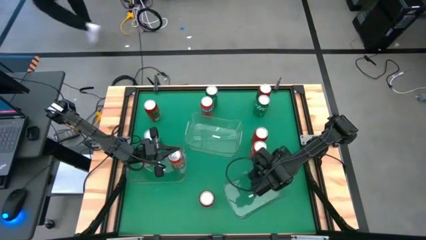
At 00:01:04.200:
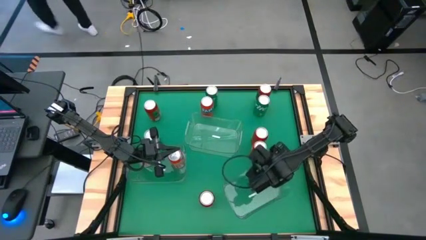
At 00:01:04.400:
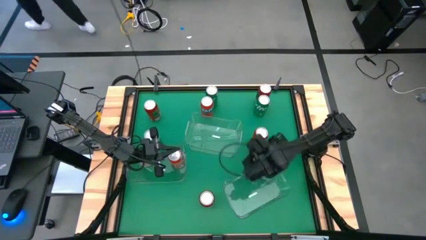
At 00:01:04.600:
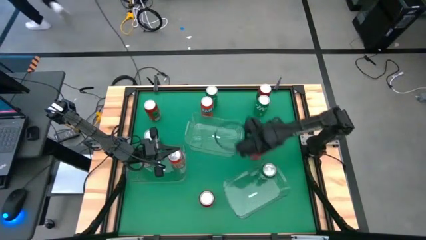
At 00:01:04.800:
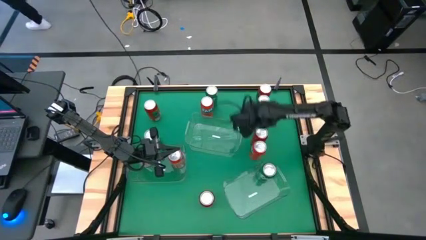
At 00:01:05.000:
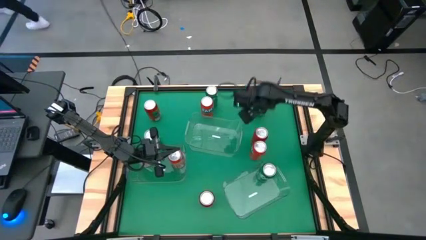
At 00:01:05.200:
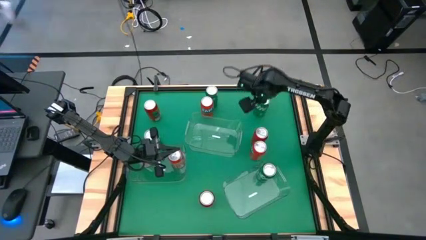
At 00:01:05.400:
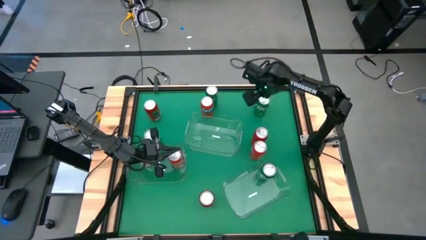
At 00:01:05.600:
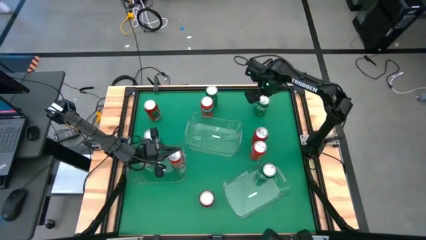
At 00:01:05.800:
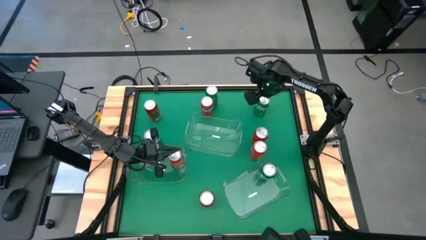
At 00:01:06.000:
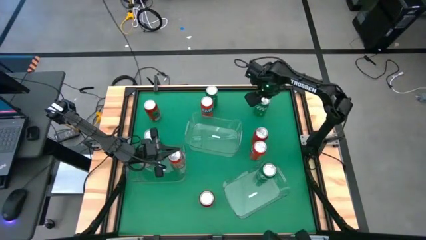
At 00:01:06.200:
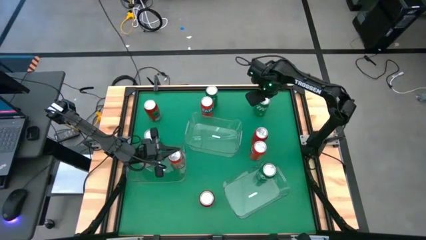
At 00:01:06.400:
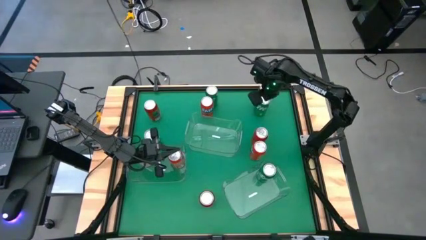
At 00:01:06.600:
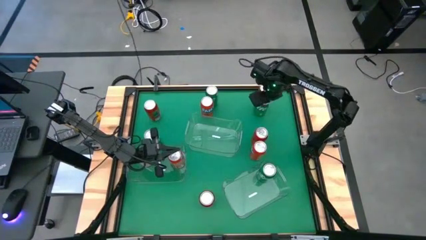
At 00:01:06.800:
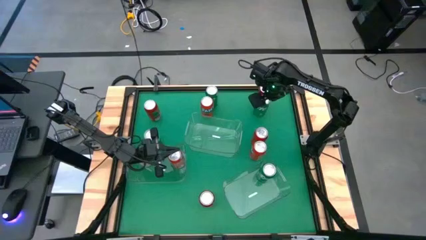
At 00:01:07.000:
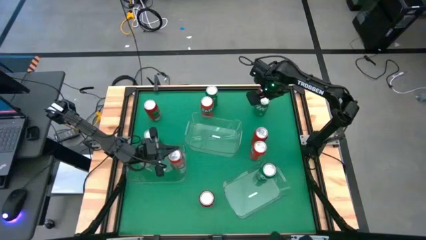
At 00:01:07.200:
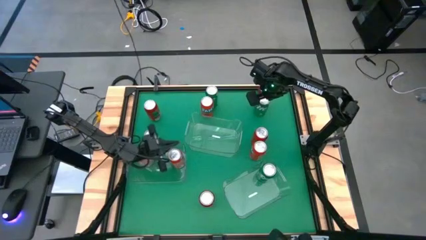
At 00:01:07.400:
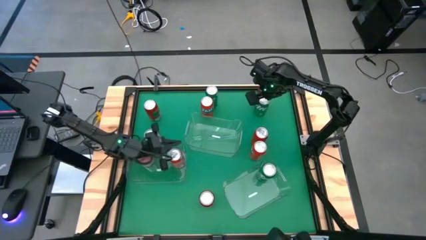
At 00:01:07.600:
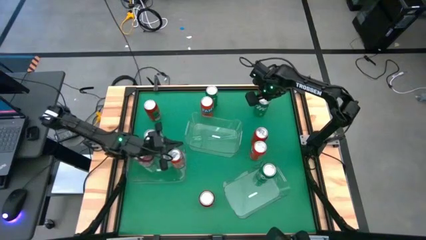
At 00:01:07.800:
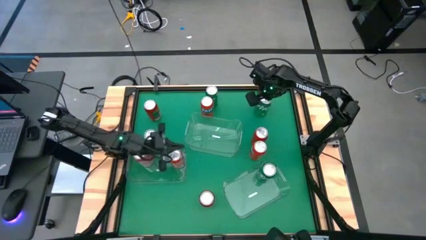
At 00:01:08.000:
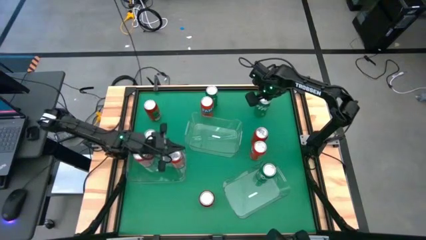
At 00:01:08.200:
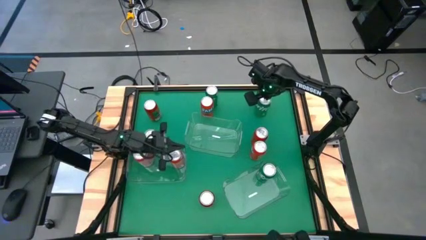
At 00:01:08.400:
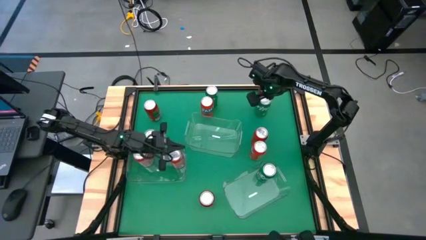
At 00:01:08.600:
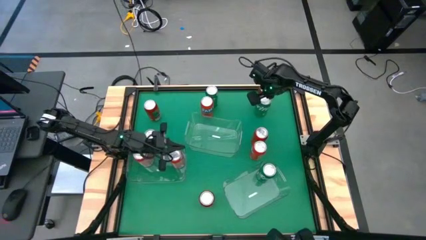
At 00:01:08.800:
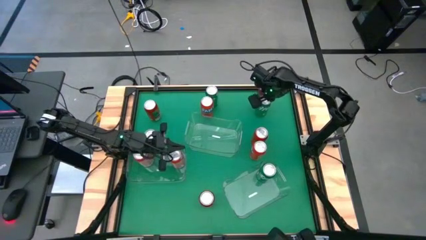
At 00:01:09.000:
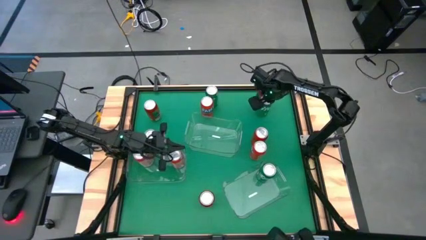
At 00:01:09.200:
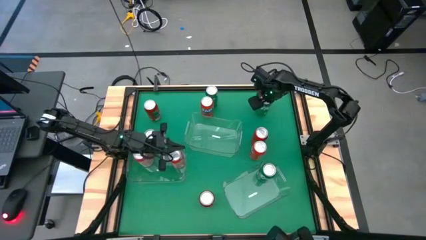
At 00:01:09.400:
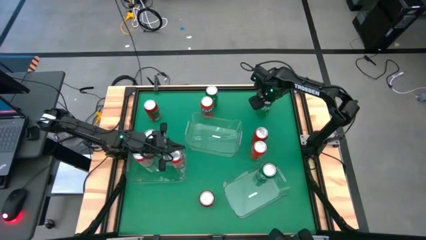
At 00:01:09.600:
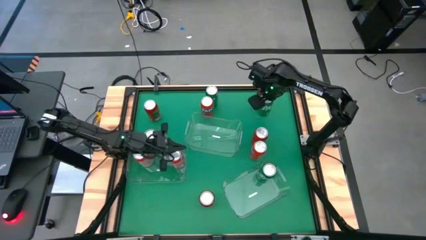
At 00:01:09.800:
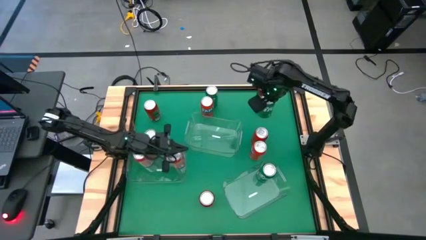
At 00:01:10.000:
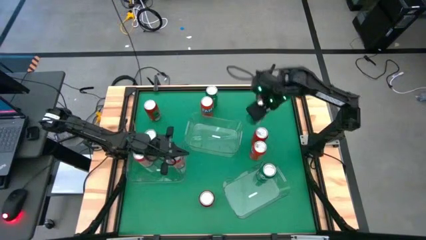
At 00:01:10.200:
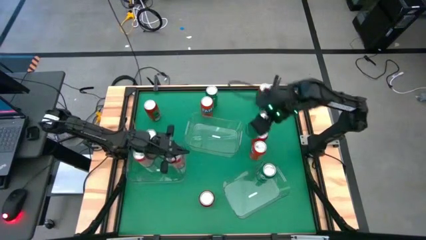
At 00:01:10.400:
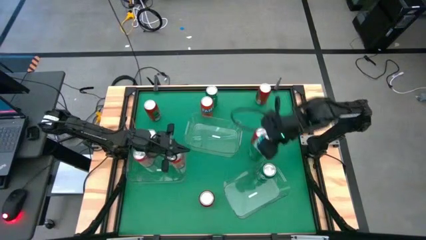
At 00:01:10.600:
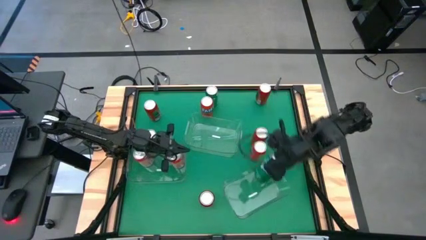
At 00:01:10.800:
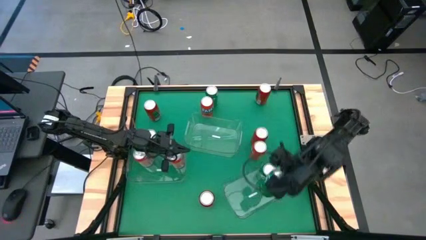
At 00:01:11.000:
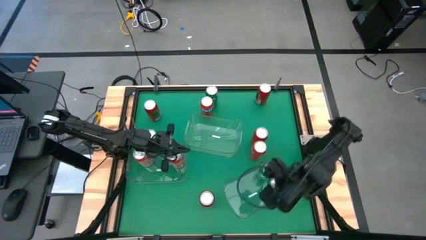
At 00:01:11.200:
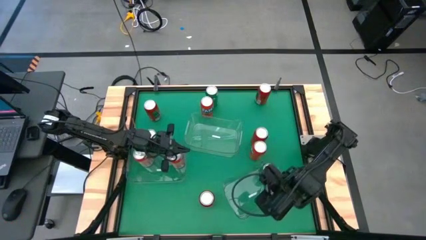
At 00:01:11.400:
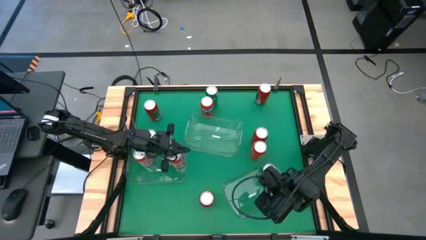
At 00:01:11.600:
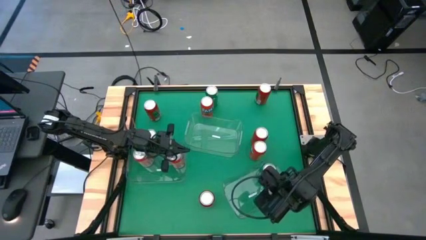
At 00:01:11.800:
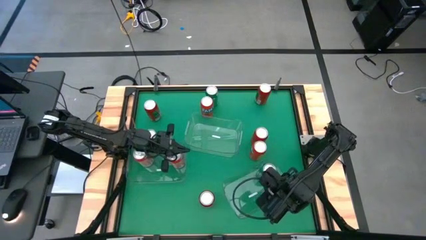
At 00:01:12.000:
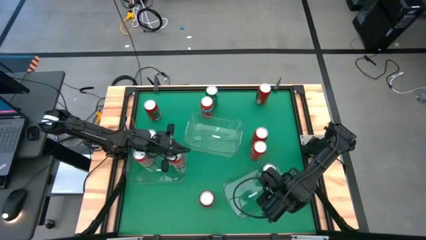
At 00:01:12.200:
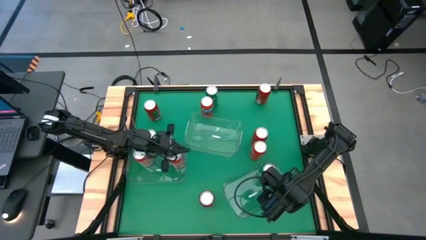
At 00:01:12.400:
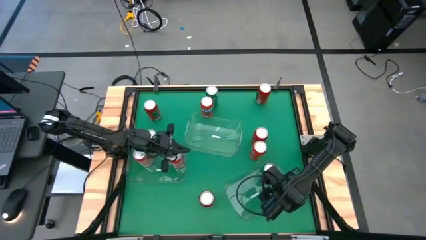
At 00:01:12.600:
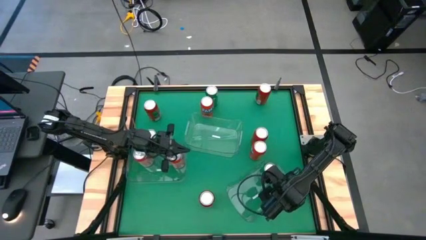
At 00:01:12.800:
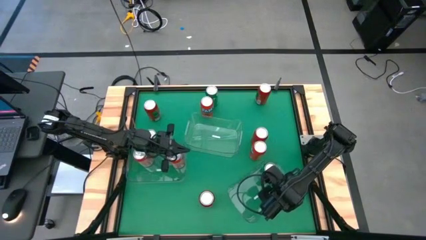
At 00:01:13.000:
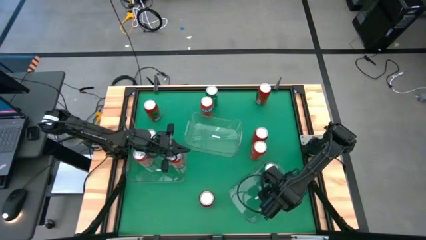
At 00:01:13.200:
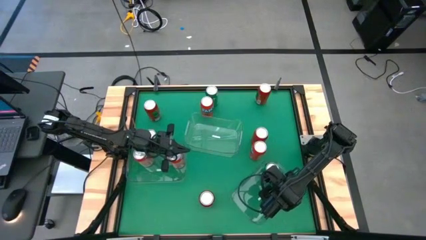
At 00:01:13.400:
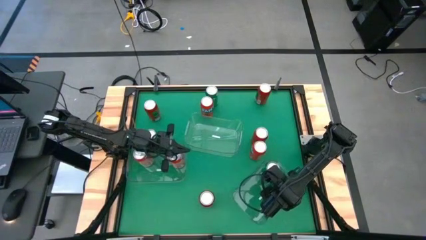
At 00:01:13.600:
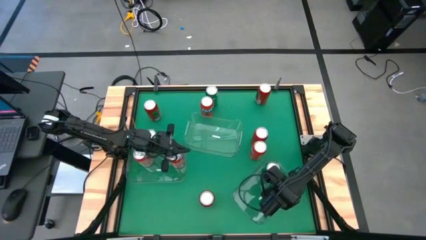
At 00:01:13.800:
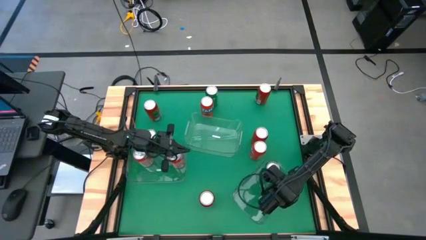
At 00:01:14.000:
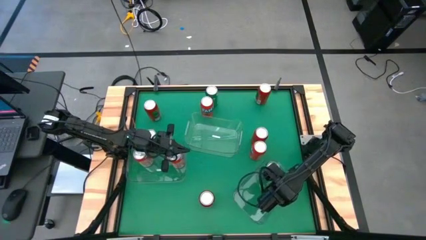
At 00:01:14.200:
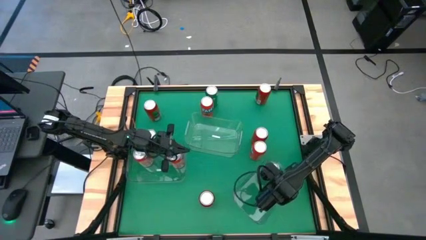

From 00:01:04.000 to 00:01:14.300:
Task: Sort soda cans
Put the top right green soda can into the bottom right transparent bin

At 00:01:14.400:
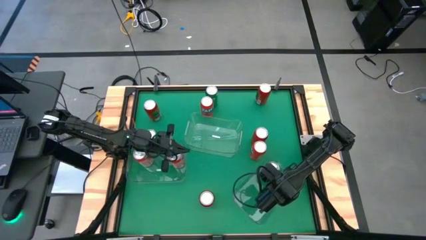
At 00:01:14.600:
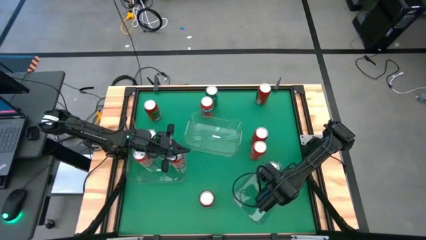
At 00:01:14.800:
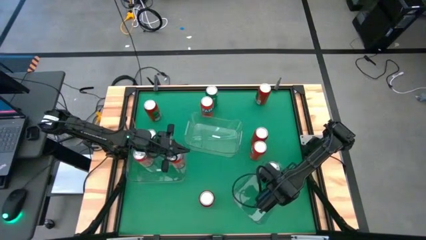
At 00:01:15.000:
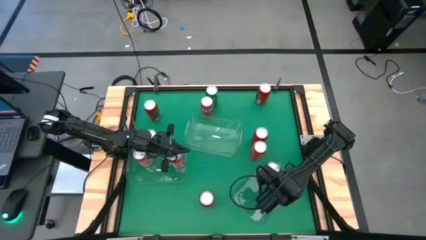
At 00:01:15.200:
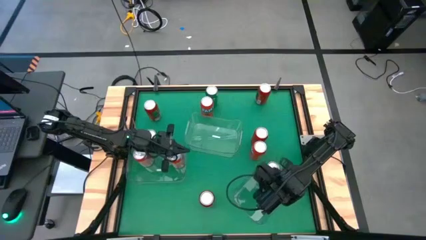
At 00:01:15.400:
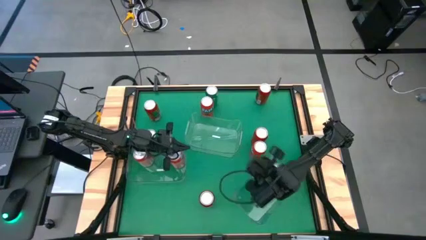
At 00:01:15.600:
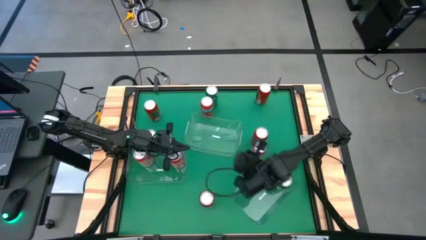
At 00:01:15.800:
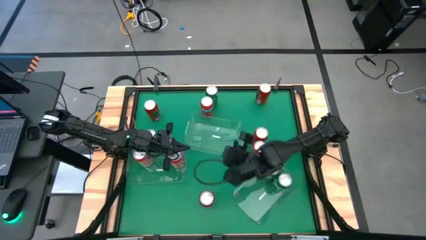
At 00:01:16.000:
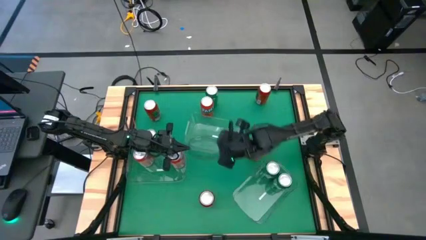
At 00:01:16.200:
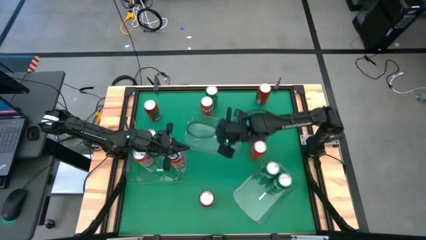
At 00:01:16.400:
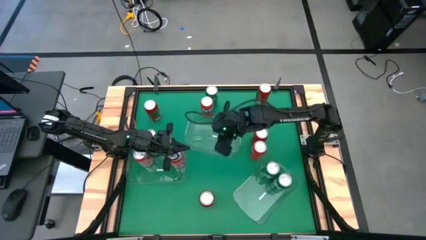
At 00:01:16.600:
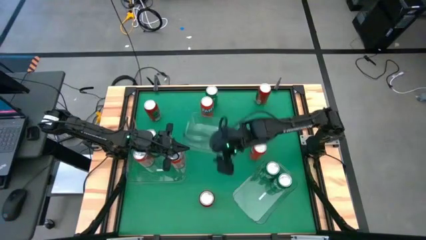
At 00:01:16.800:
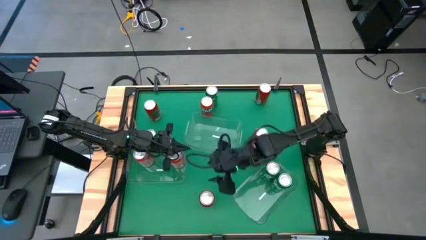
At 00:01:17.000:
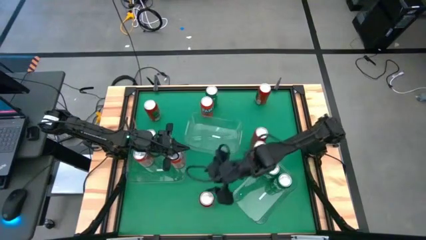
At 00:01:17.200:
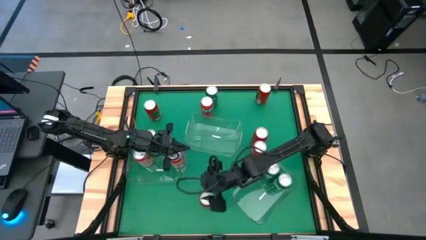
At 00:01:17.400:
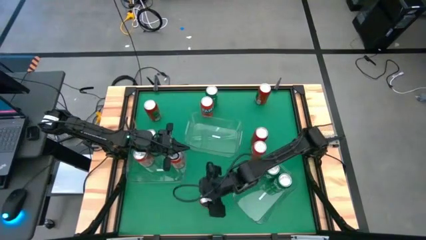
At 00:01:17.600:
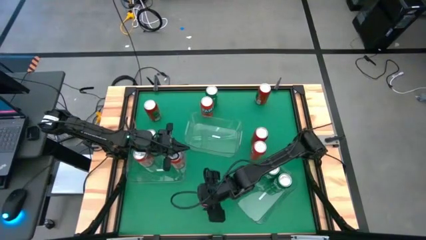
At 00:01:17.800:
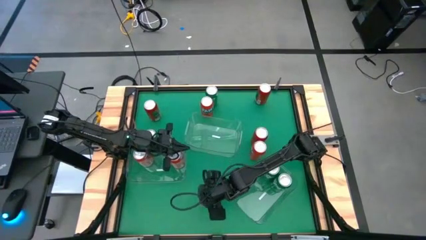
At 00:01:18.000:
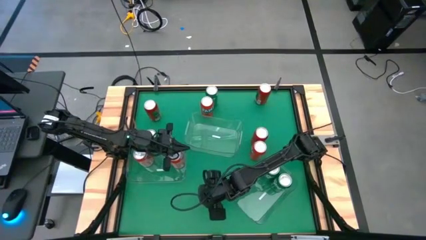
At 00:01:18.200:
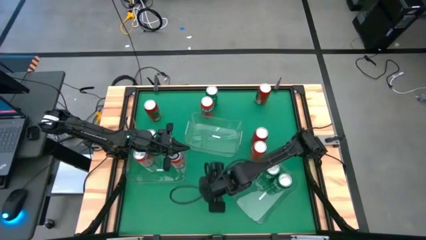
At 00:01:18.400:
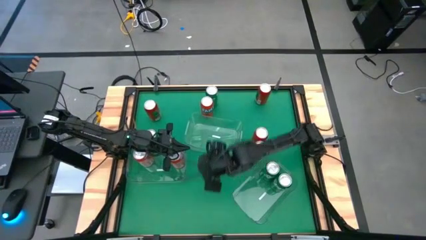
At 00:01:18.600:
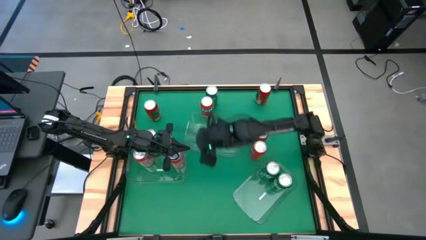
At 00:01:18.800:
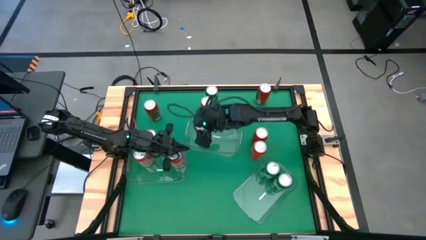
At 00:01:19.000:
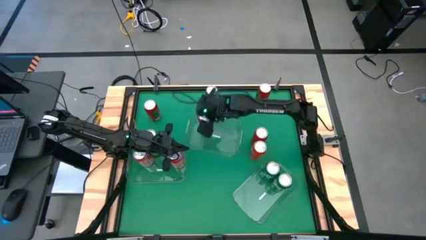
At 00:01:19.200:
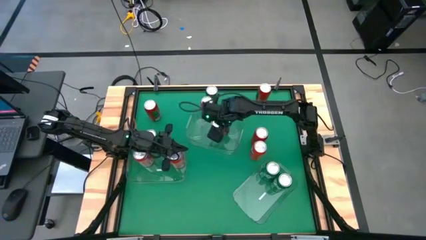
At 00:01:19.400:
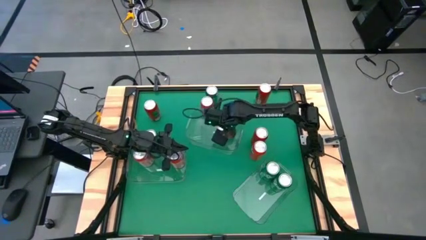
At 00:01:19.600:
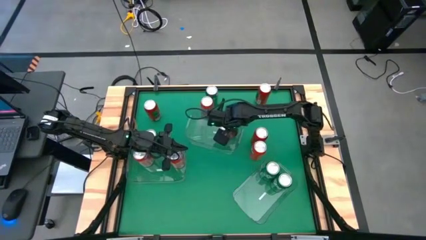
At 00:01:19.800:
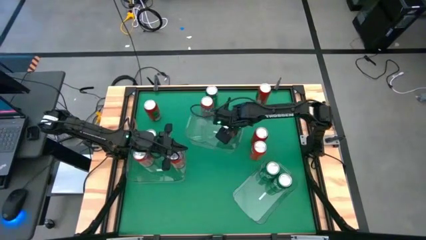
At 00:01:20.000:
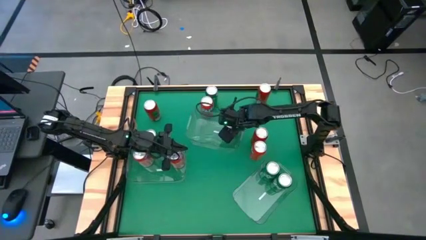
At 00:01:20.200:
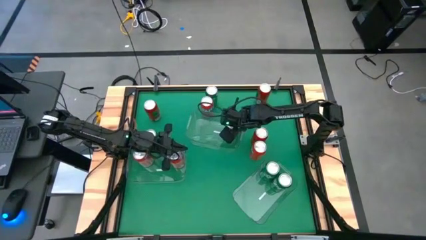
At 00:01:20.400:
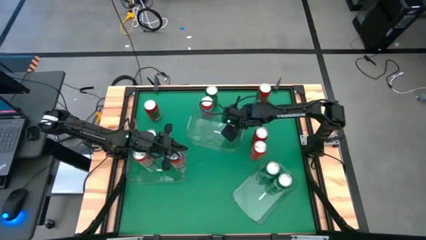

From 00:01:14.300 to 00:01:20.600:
Put the red black soda can into the top transparent bin
